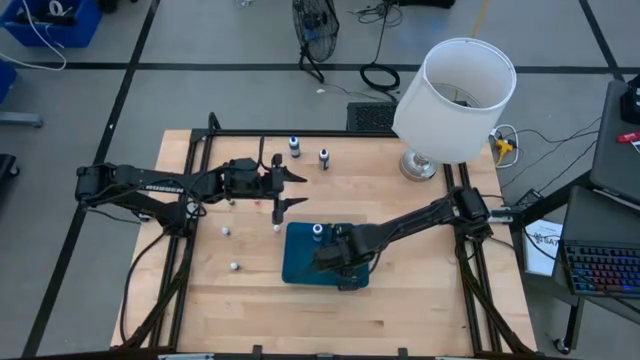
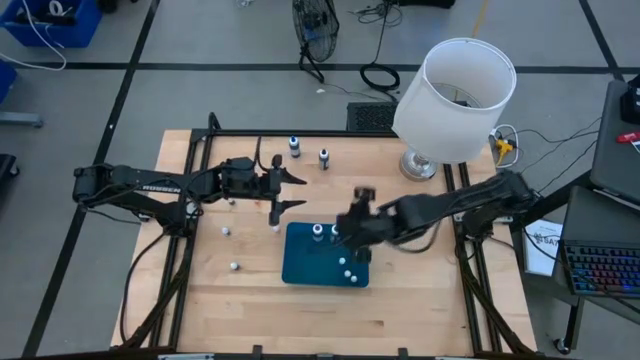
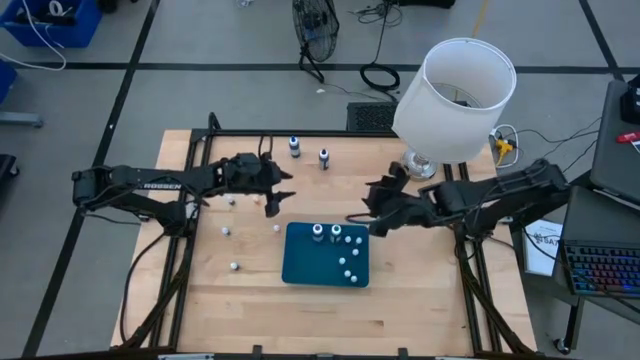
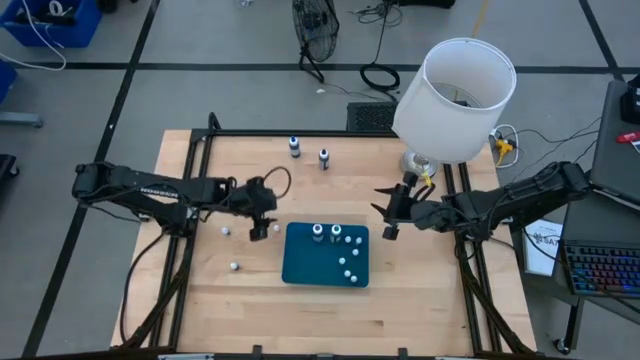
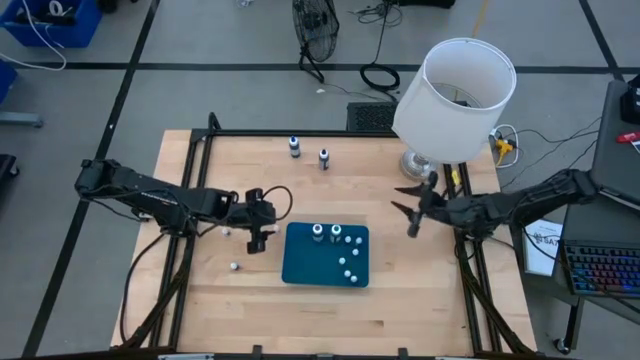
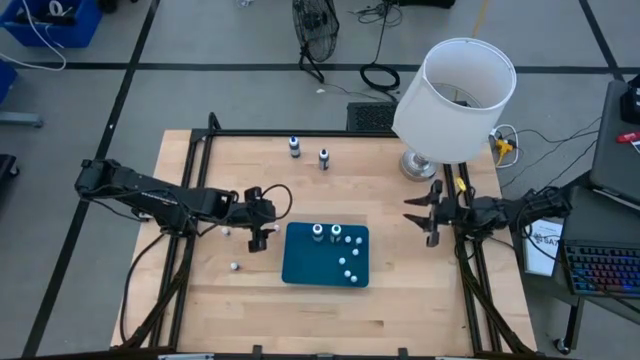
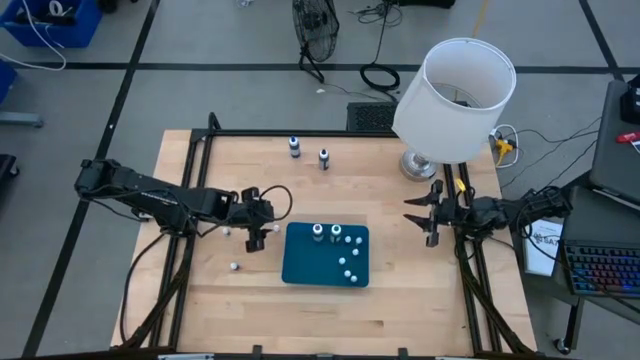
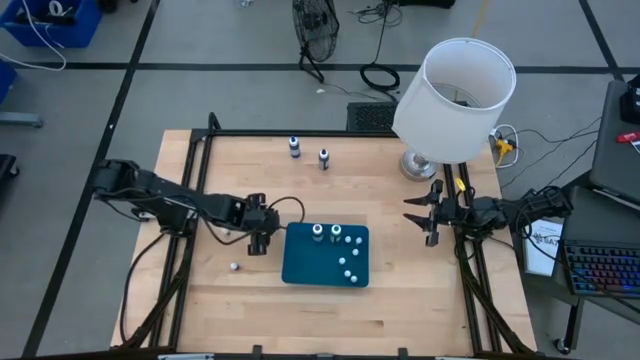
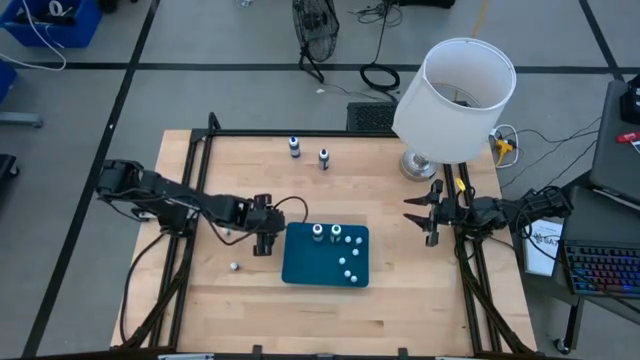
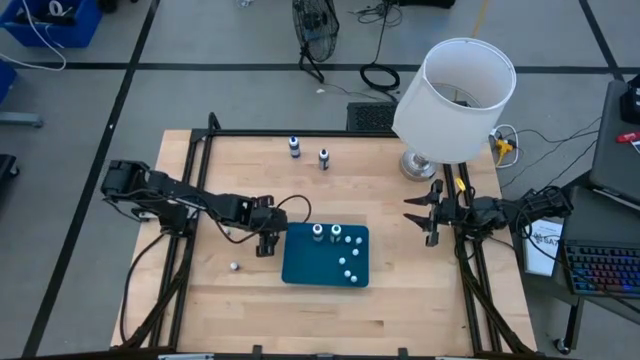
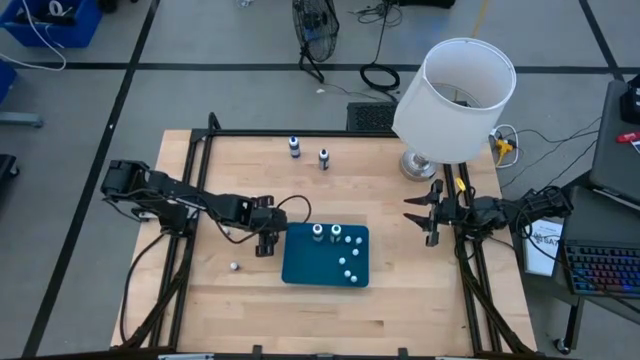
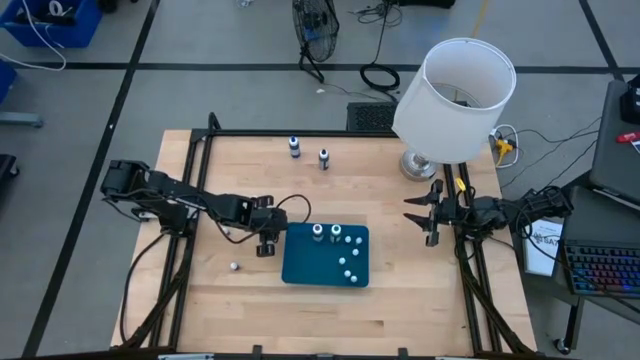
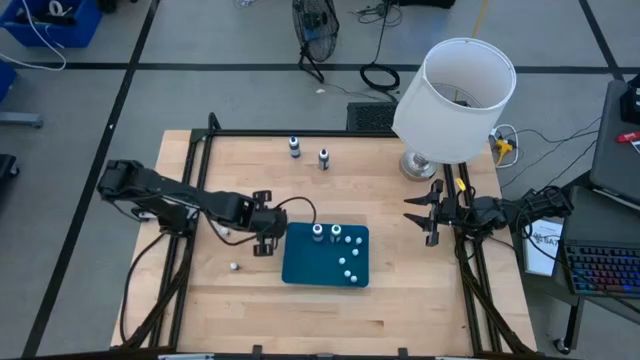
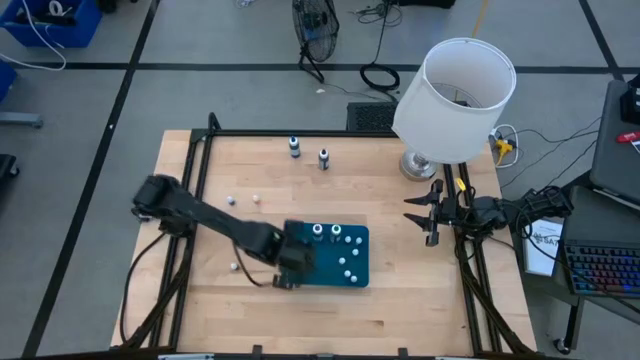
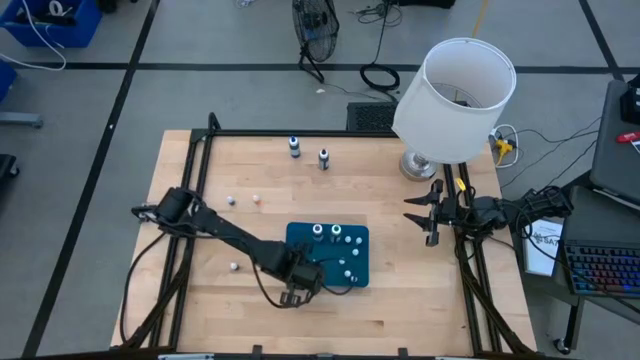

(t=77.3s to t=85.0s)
Task: Pick & Place food coloring
Put the bottom small orange food coloring bottle into the blue bin

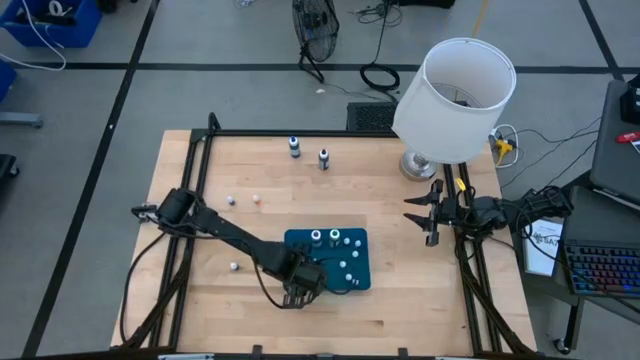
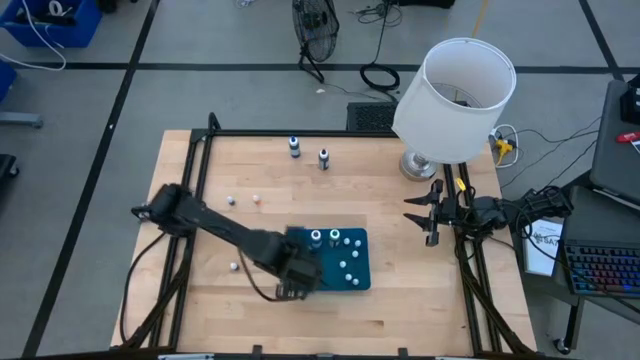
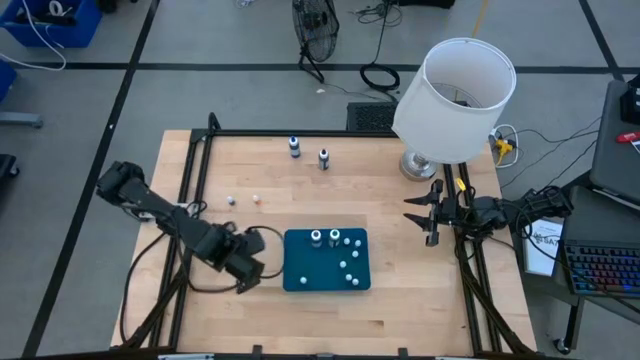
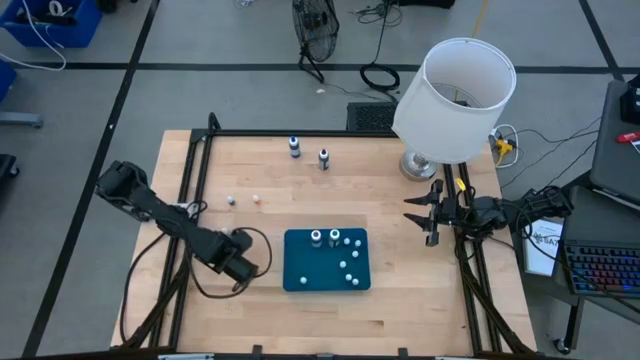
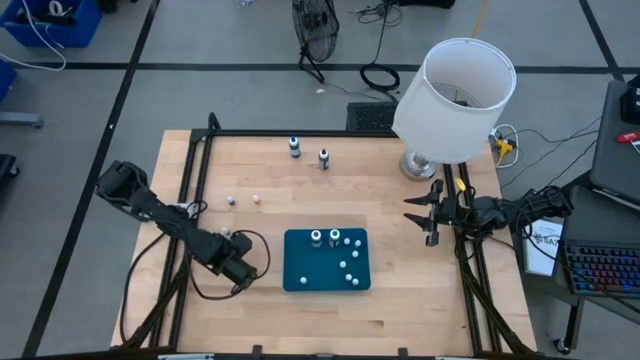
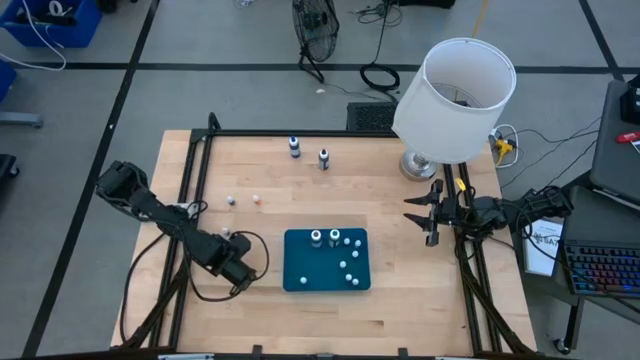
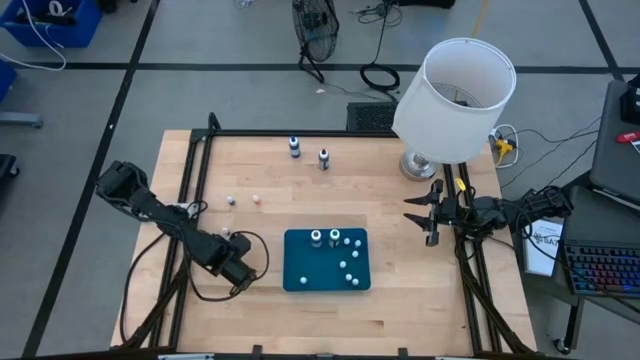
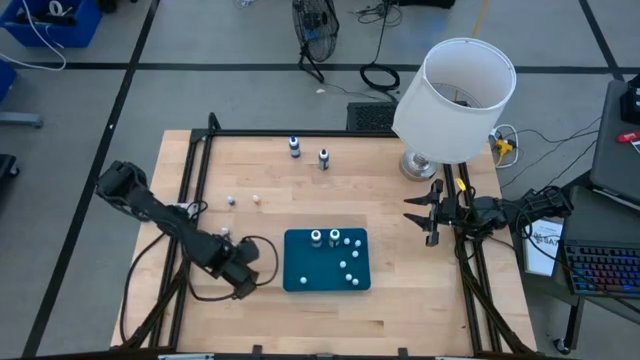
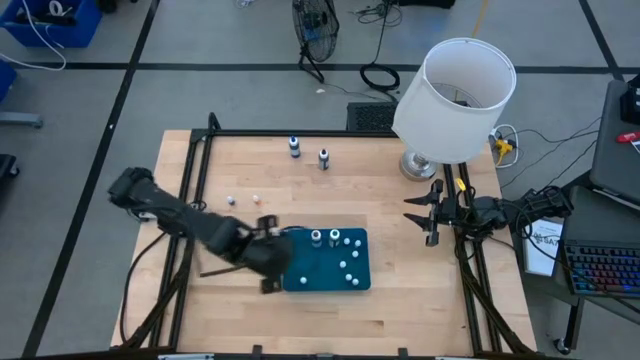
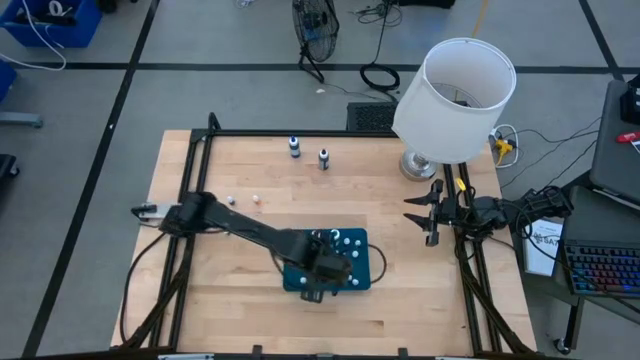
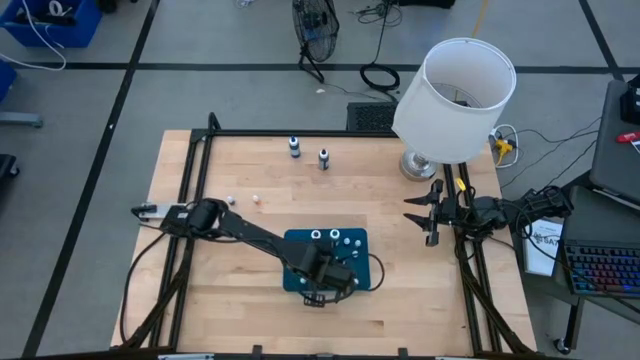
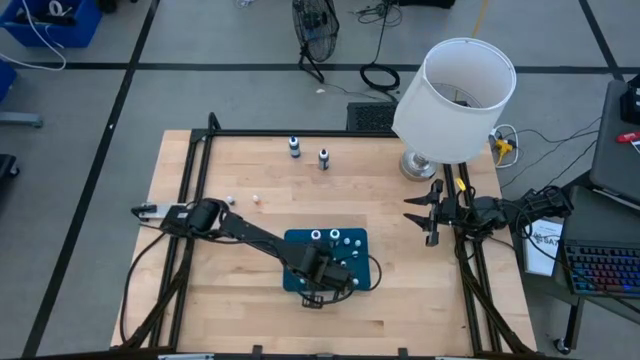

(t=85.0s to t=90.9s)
Put the bottom small purple food coloring bottle into the blue bin

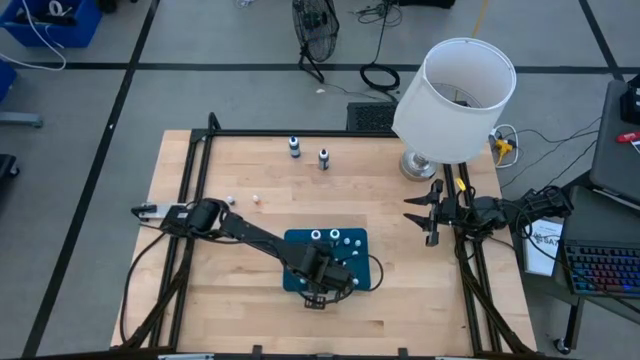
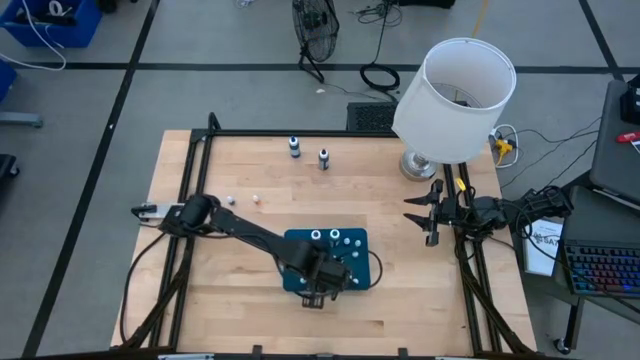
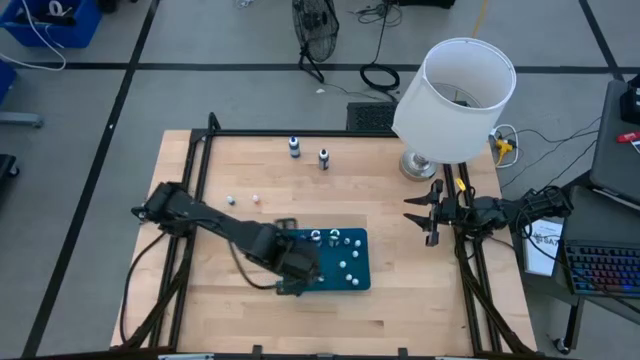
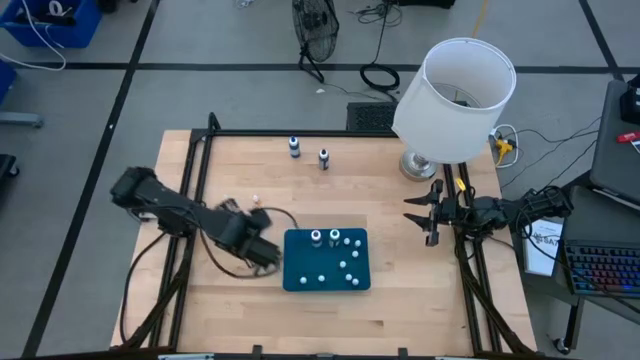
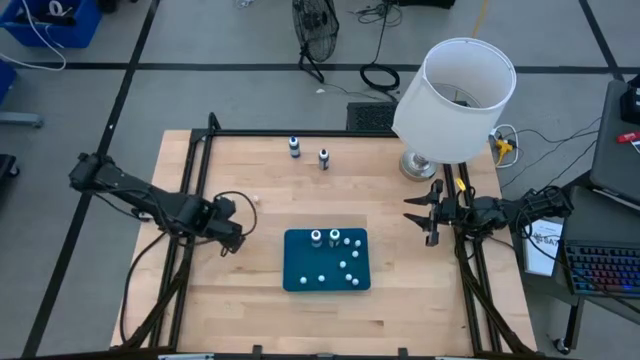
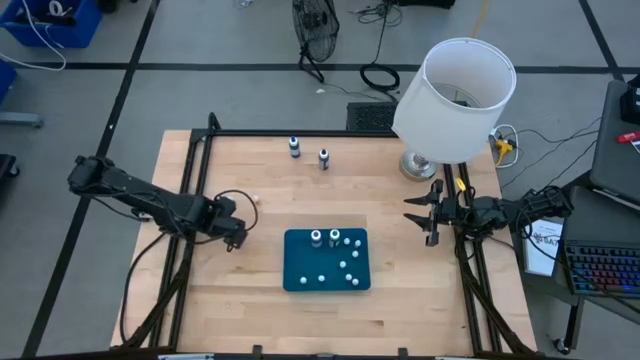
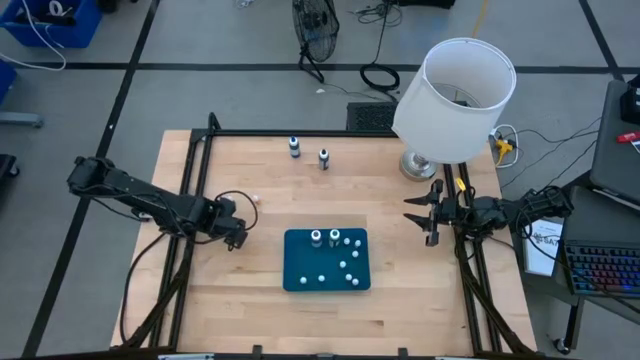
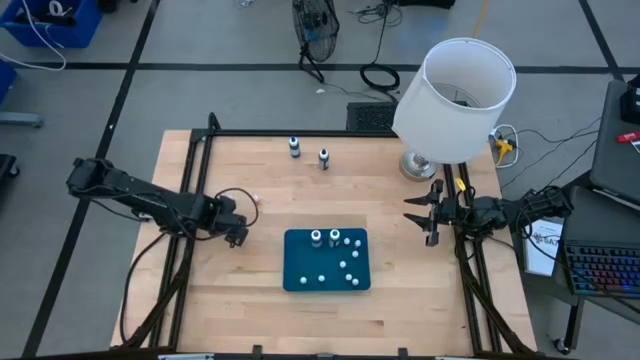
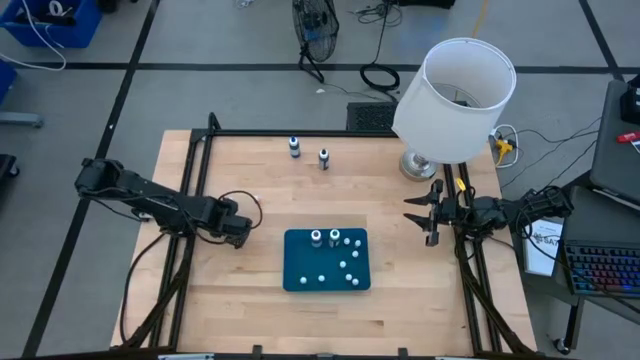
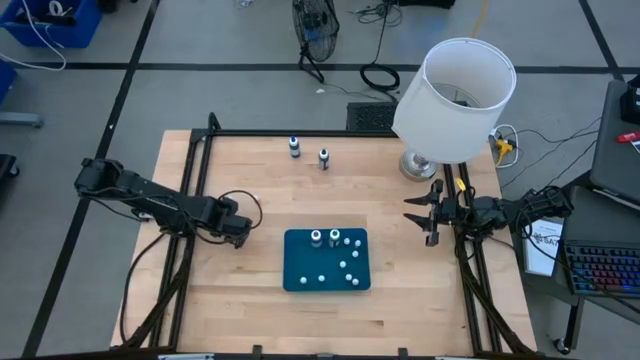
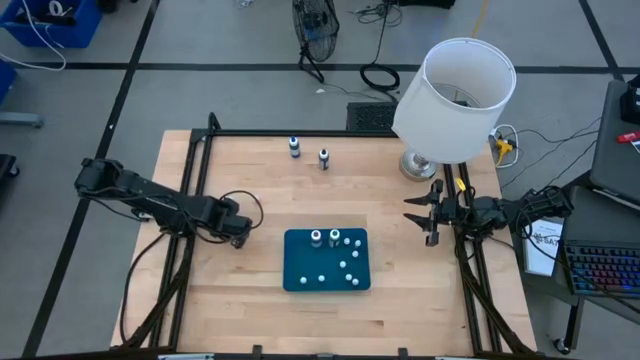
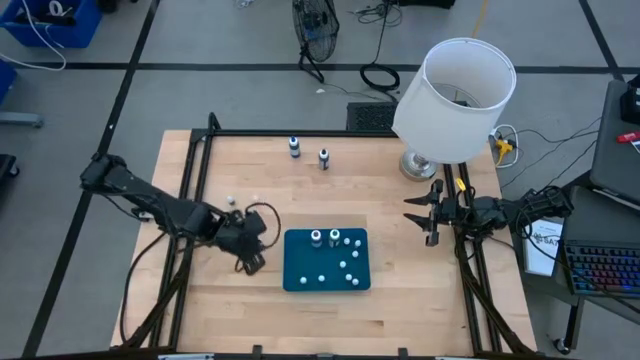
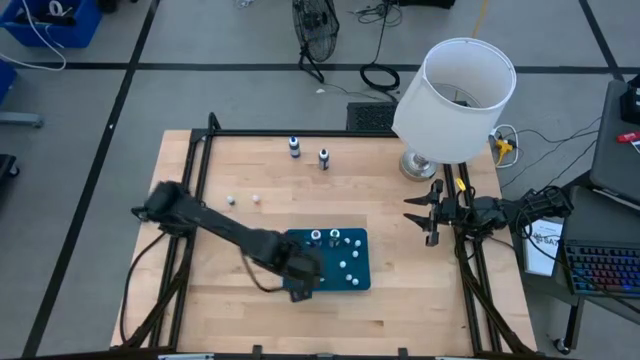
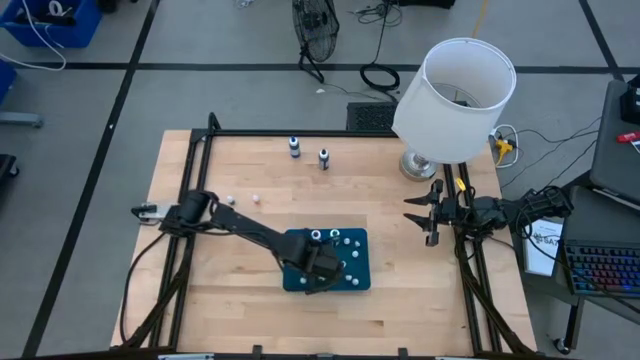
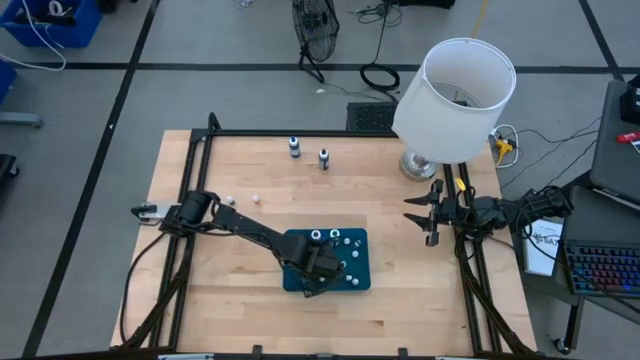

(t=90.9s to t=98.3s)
Put the small blue food coloring bottle into the blue bin
